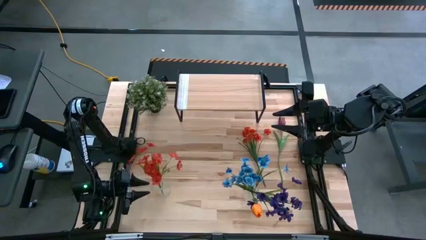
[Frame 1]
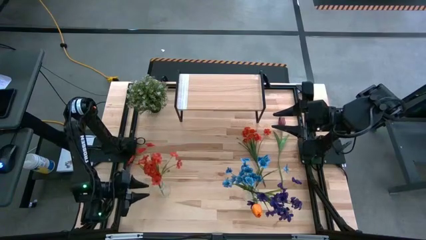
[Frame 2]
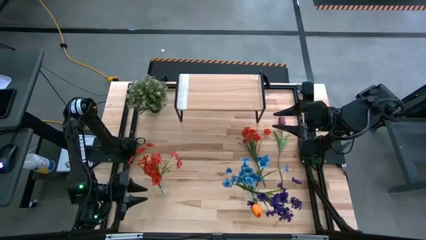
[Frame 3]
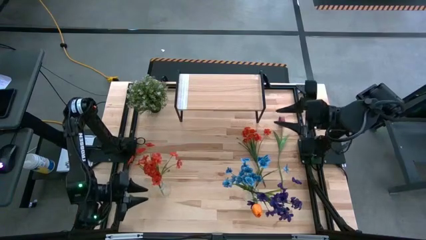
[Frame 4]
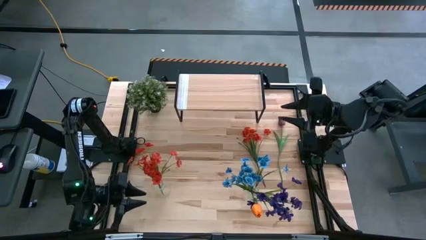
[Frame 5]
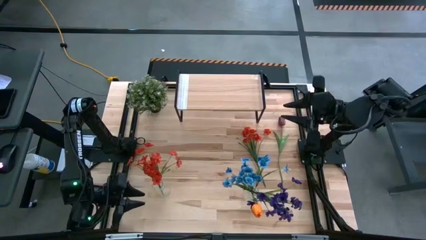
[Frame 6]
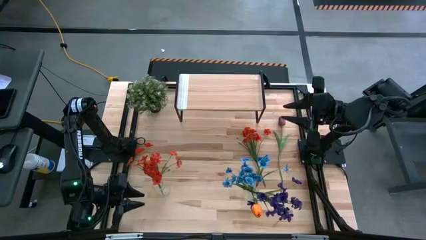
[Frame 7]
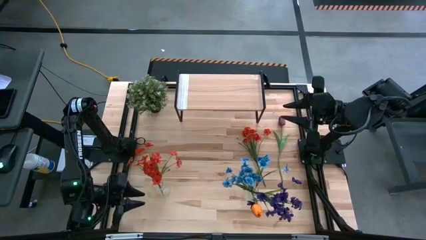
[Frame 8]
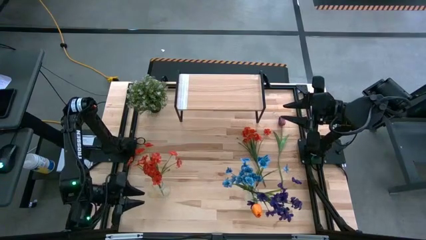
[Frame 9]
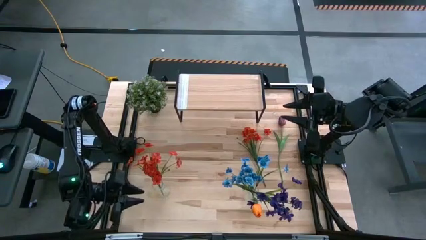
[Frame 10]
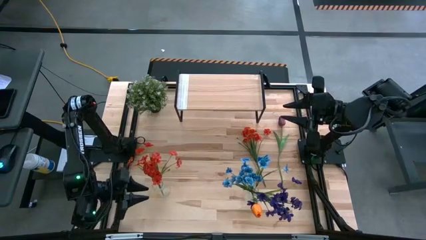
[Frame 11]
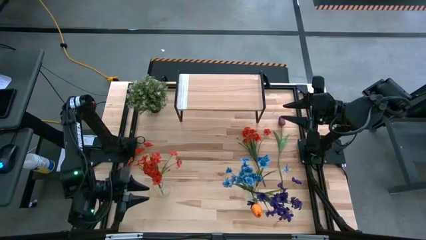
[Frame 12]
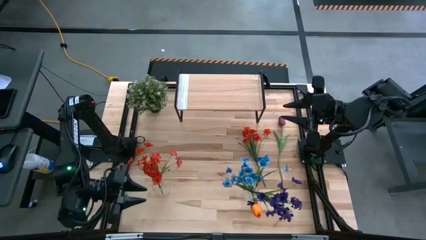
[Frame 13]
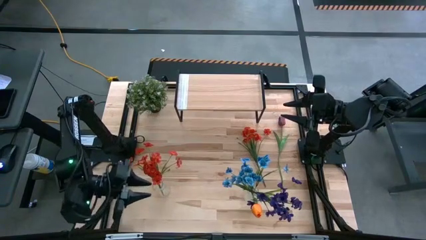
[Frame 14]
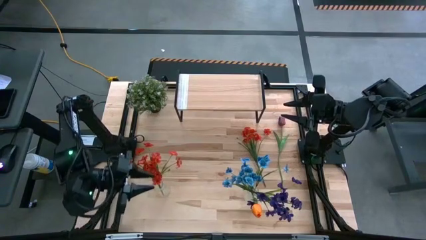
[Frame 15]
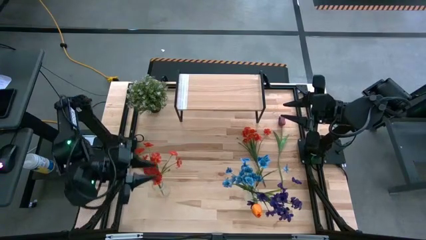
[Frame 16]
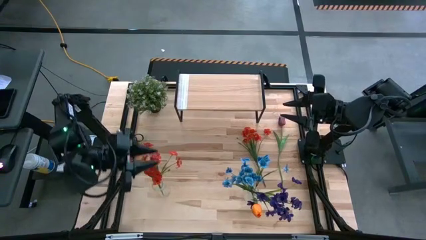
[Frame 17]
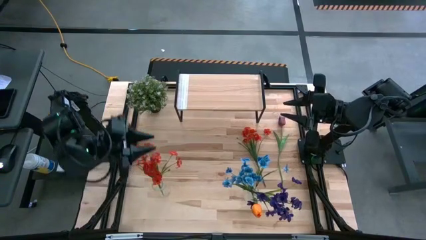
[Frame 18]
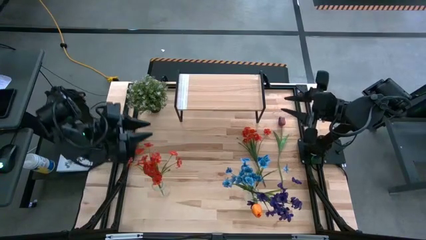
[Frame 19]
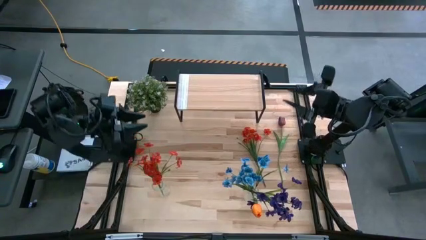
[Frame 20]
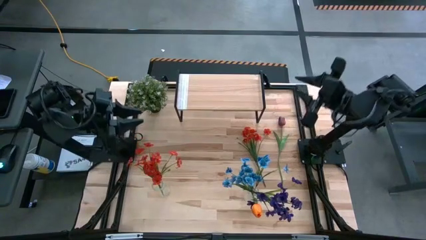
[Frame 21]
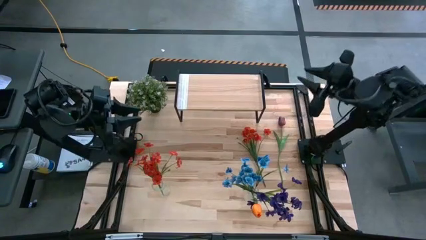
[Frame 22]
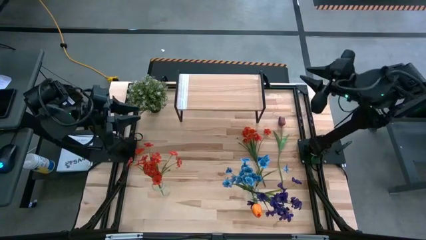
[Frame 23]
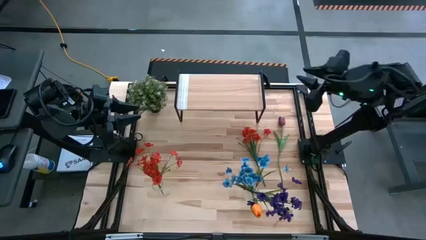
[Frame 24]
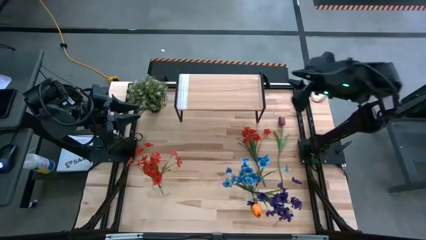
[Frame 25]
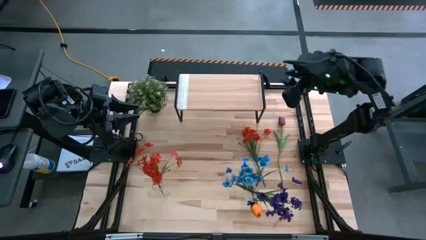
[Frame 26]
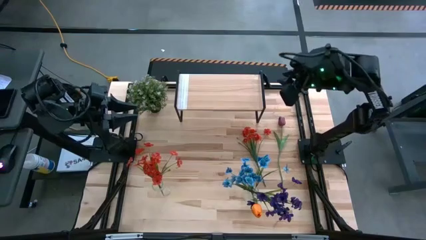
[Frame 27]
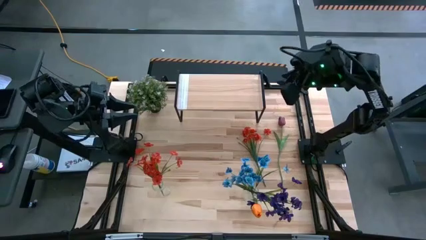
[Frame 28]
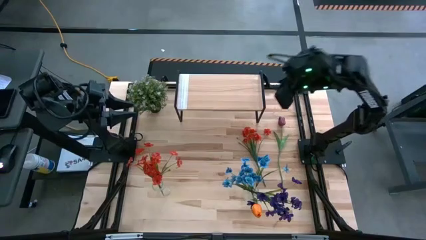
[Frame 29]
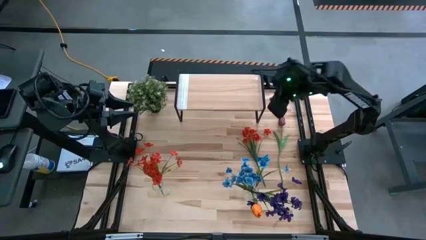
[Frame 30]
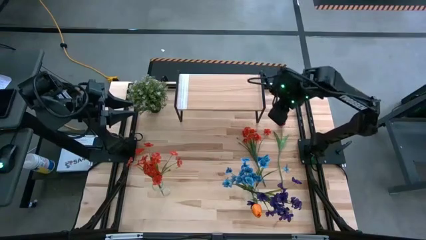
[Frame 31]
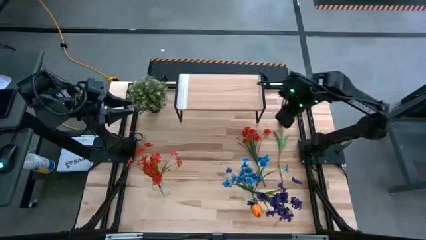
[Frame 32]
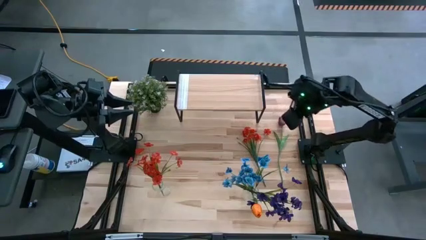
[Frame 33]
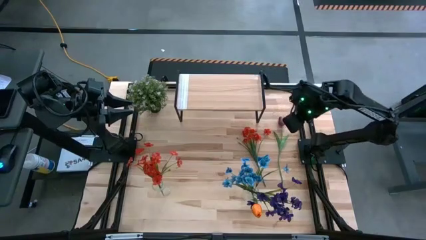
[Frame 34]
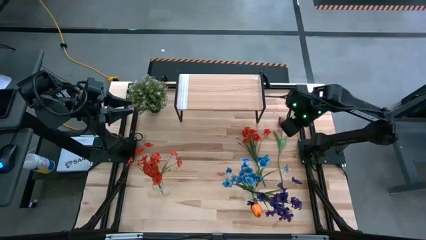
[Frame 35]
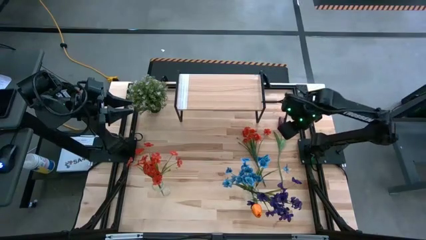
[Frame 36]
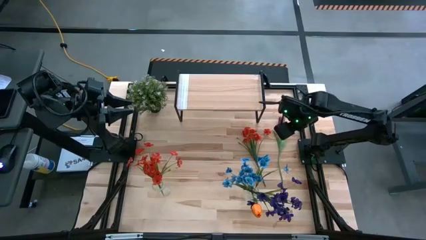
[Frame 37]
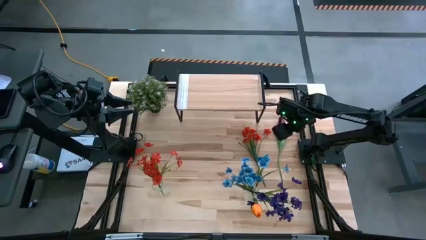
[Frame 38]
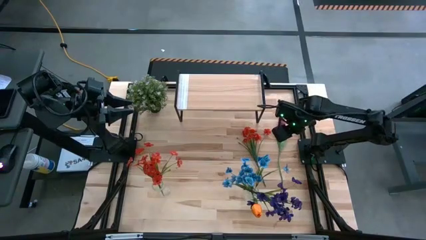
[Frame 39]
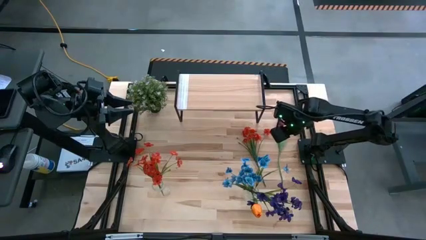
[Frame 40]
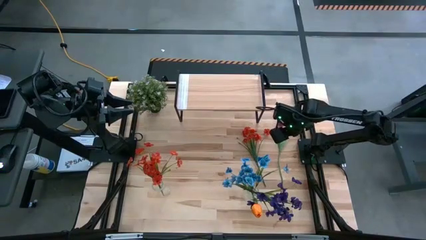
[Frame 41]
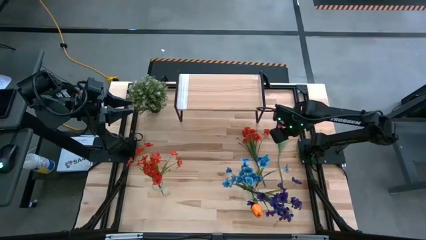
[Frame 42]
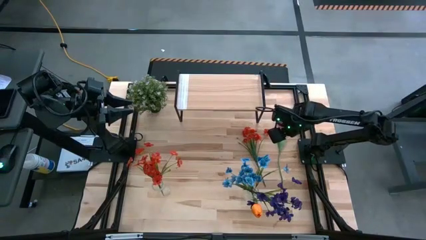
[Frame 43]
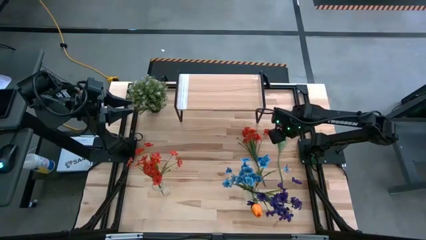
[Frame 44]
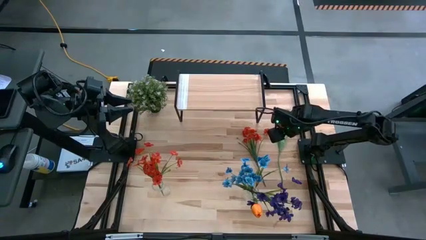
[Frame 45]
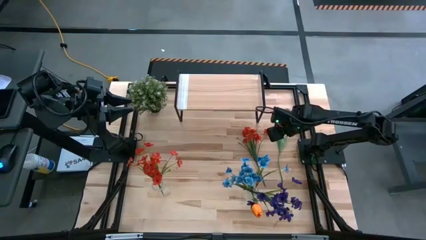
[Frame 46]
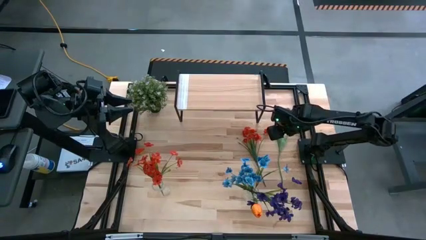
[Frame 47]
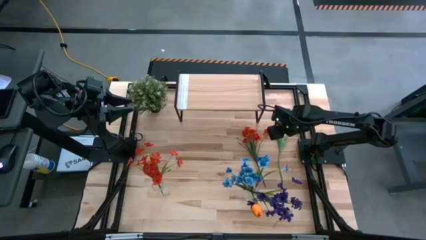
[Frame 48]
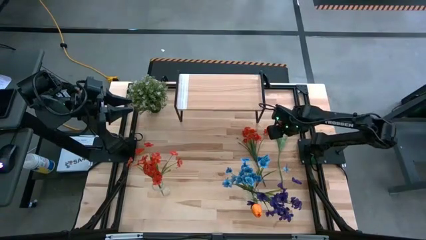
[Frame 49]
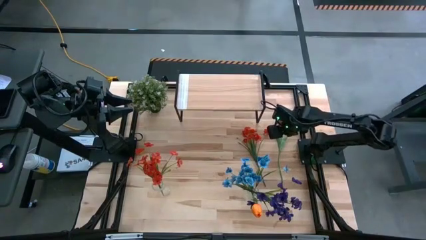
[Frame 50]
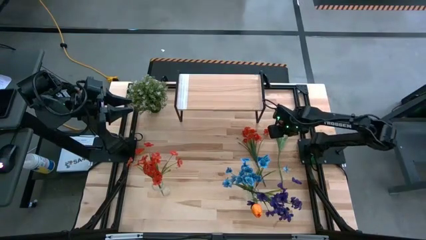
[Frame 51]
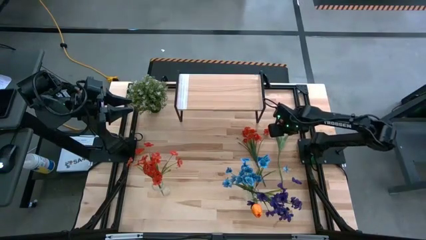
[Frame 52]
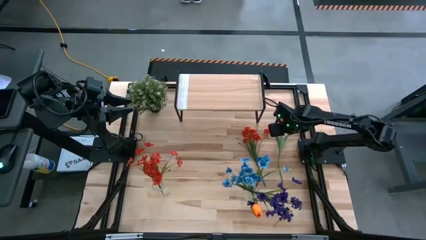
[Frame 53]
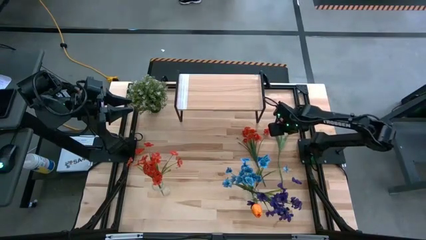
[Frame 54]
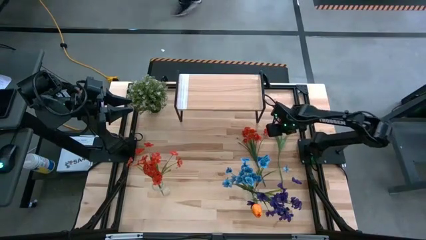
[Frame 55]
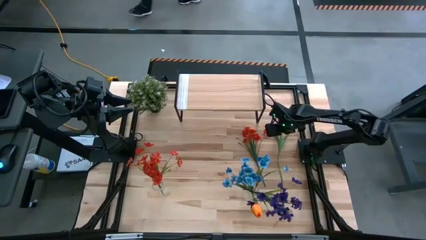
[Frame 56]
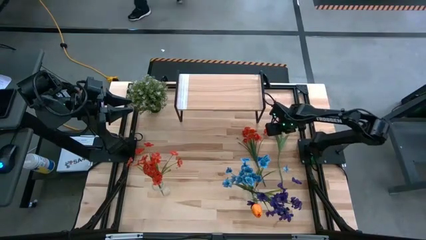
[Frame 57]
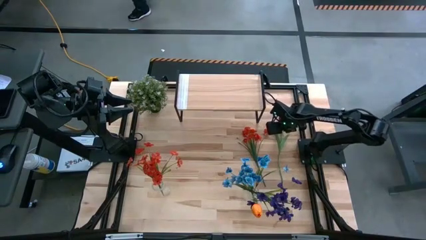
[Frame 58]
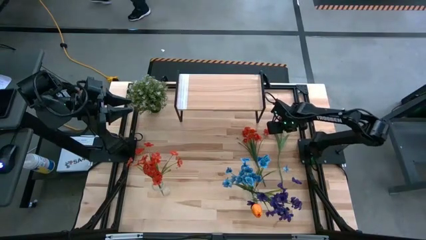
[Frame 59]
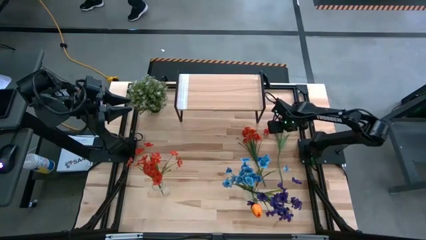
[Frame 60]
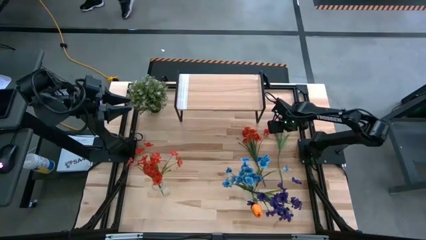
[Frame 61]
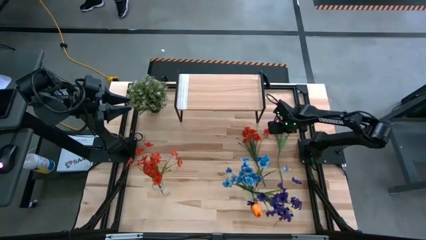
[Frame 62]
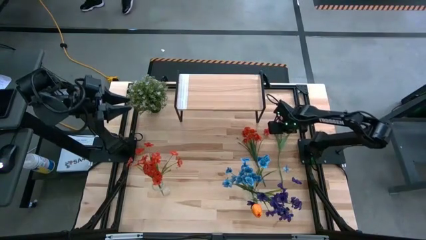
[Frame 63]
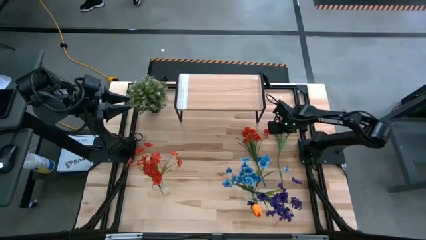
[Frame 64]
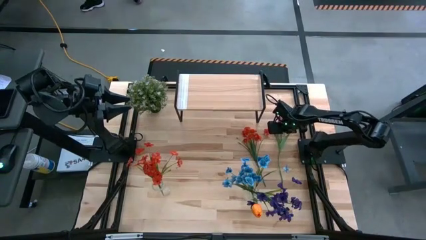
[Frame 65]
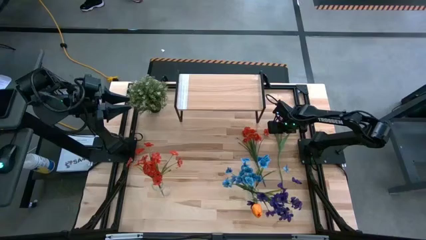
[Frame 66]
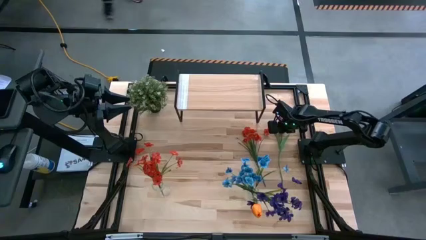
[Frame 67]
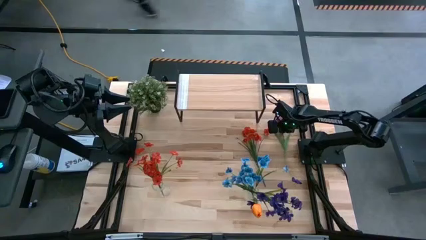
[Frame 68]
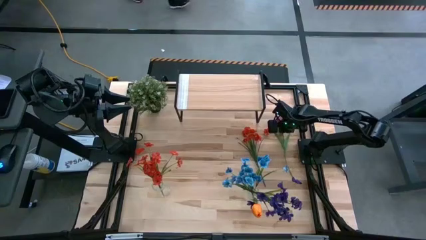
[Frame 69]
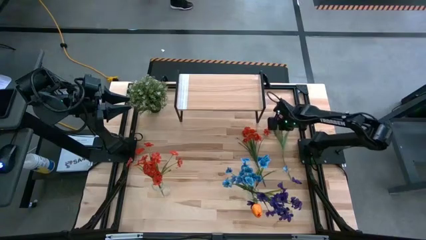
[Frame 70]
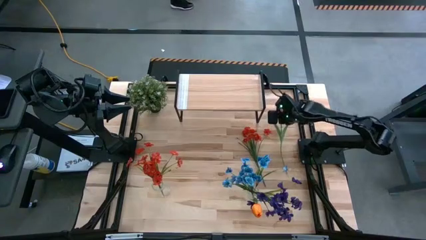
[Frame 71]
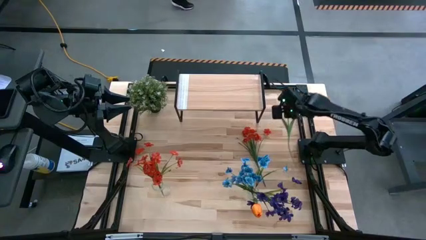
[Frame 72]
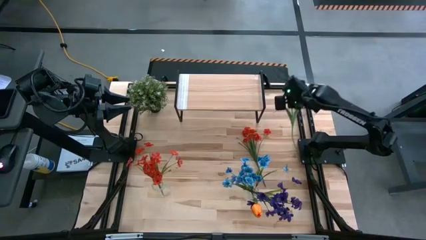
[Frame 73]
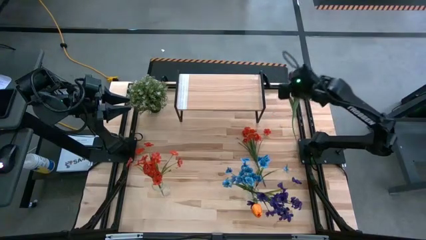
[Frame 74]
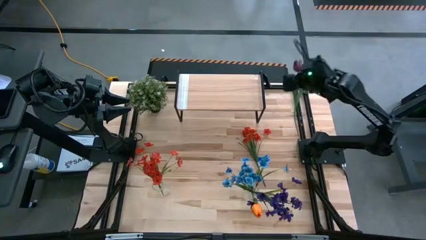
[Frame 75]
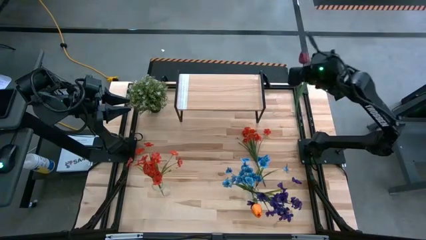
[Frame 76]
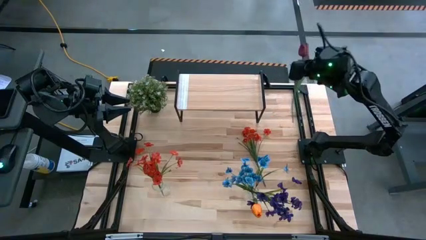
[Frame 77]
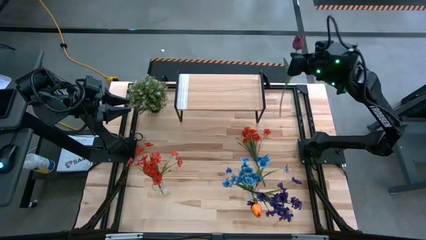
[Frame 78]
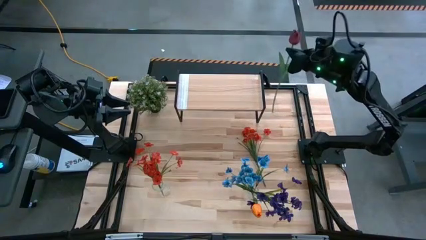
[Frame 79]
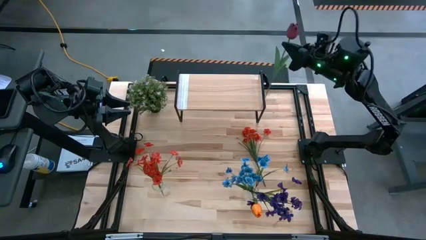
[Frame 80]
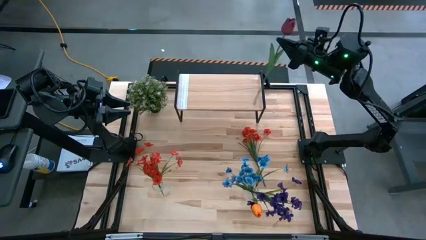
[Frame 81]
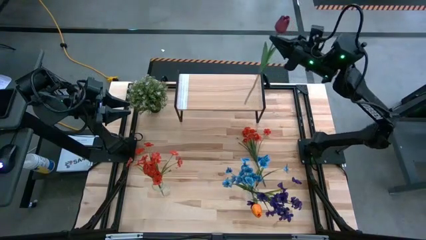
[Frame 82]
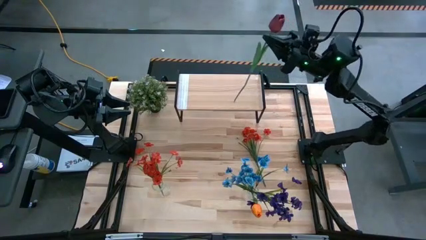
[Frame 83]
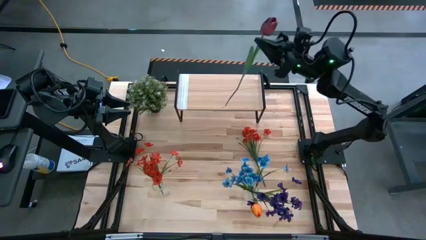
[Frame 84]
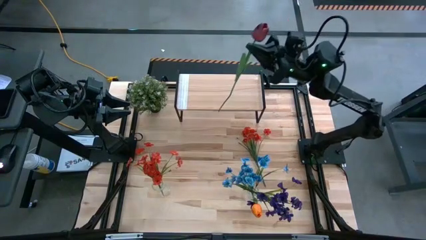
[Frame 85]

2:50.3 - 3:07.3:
Task: Pick and place flowers into a vace then onto a shelf
Put the red flower into the left transparent vase
